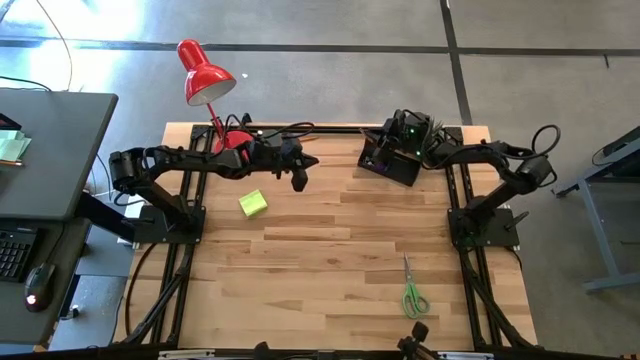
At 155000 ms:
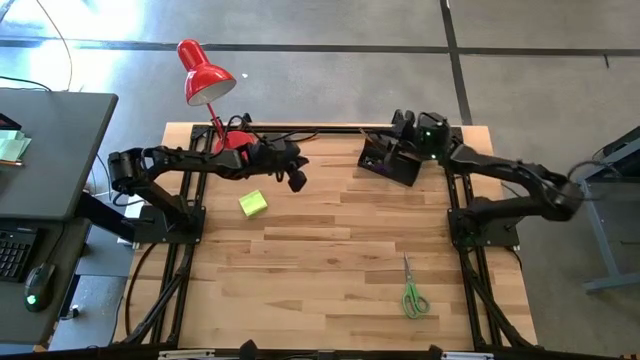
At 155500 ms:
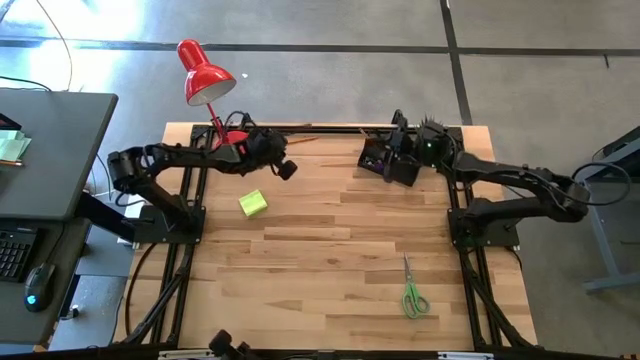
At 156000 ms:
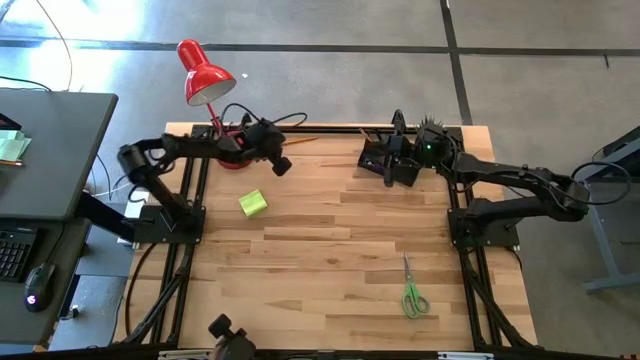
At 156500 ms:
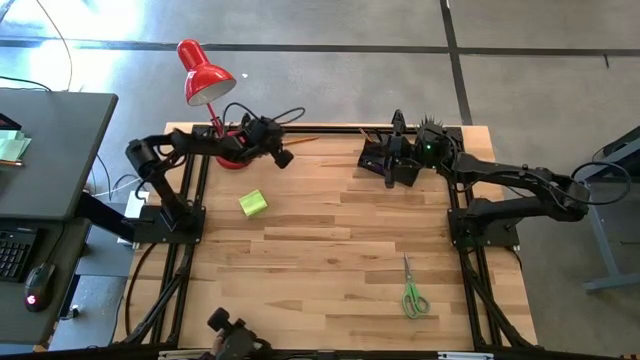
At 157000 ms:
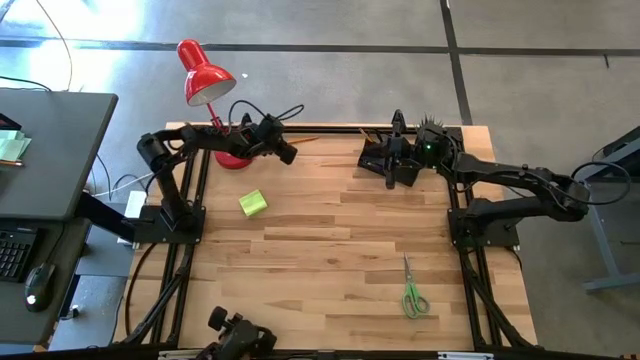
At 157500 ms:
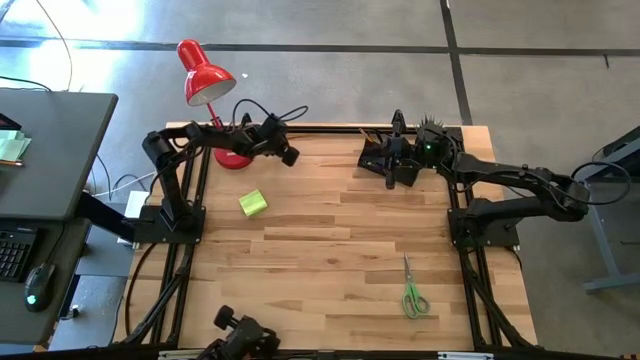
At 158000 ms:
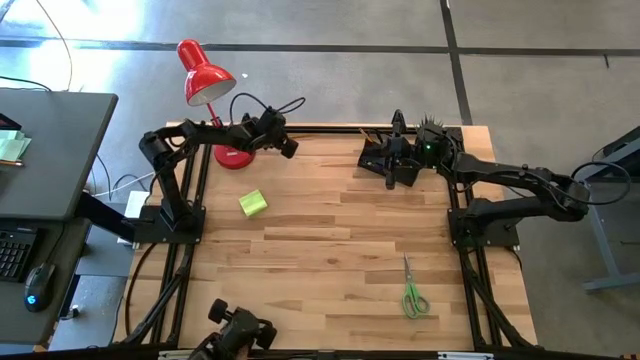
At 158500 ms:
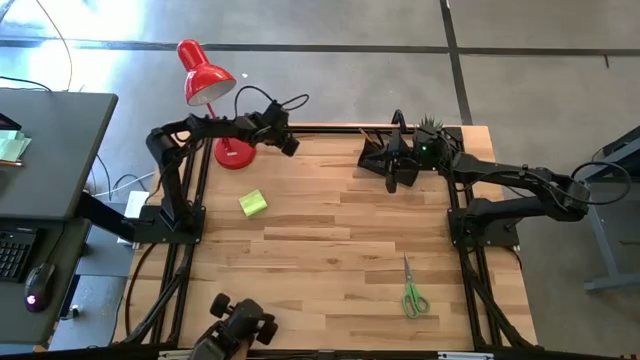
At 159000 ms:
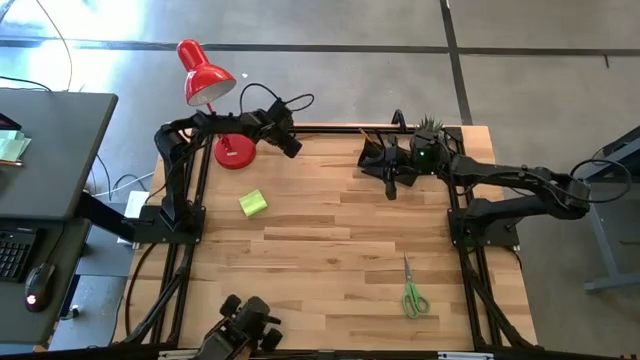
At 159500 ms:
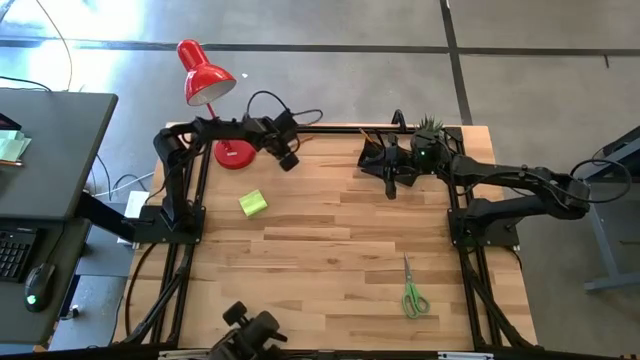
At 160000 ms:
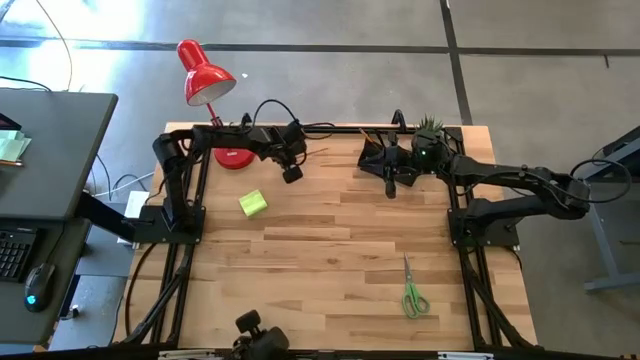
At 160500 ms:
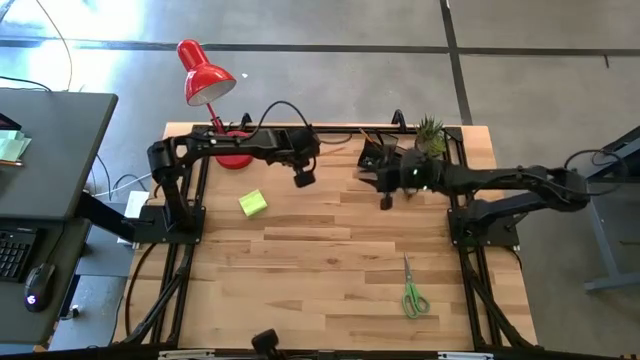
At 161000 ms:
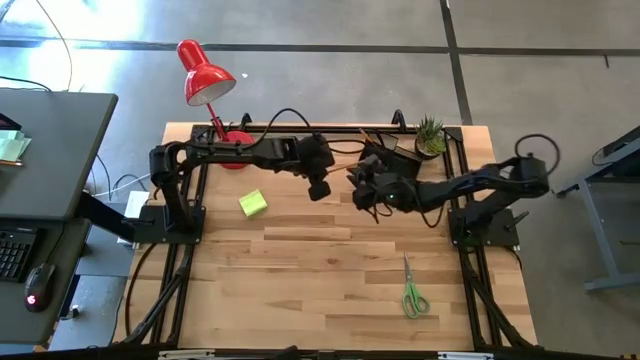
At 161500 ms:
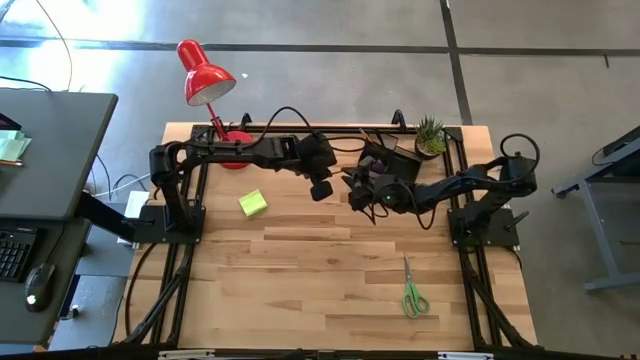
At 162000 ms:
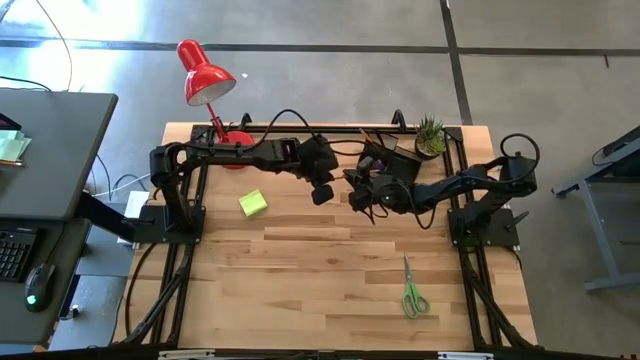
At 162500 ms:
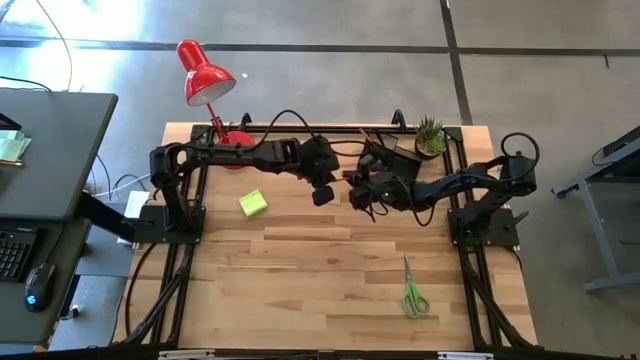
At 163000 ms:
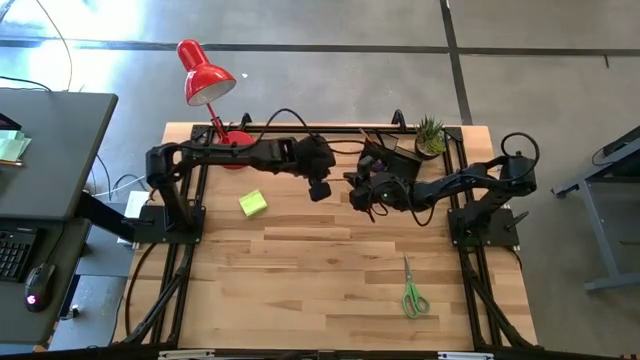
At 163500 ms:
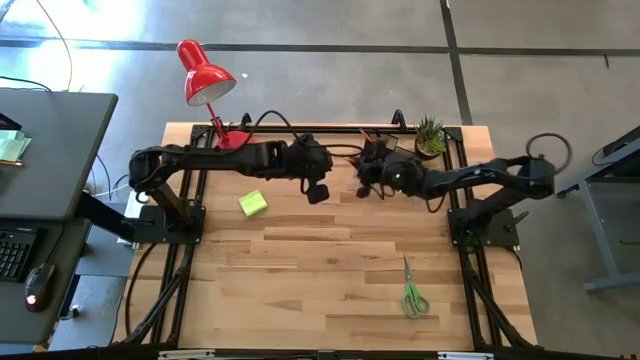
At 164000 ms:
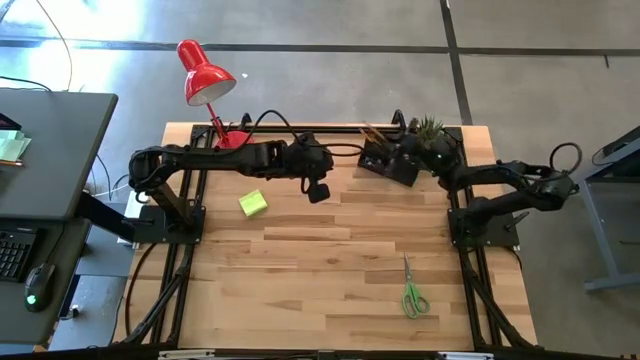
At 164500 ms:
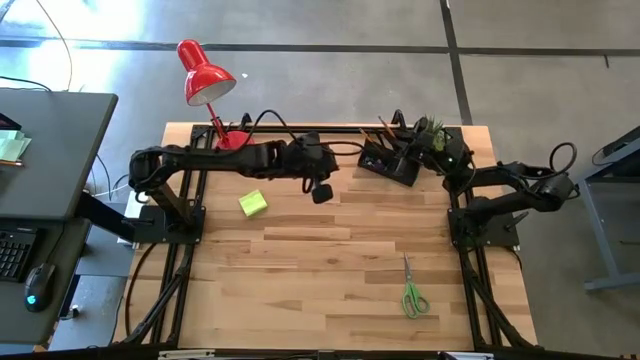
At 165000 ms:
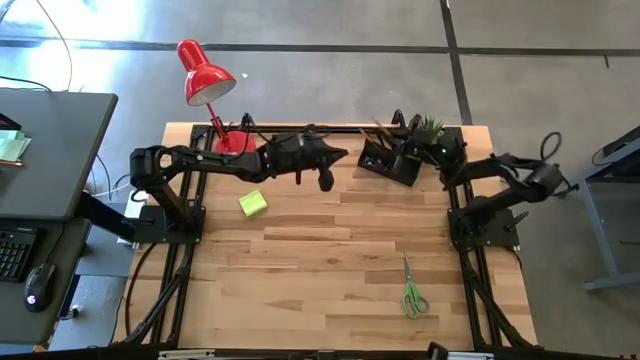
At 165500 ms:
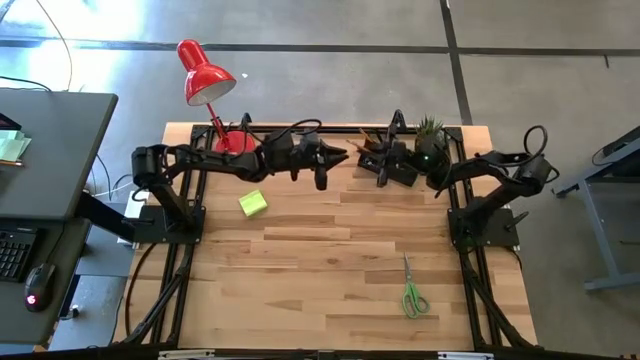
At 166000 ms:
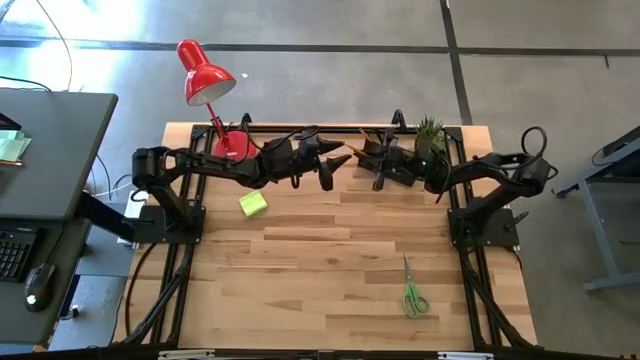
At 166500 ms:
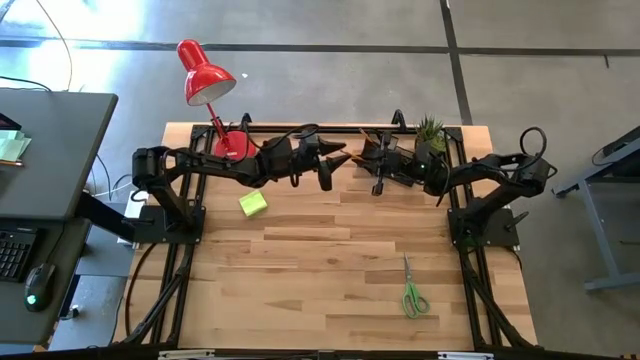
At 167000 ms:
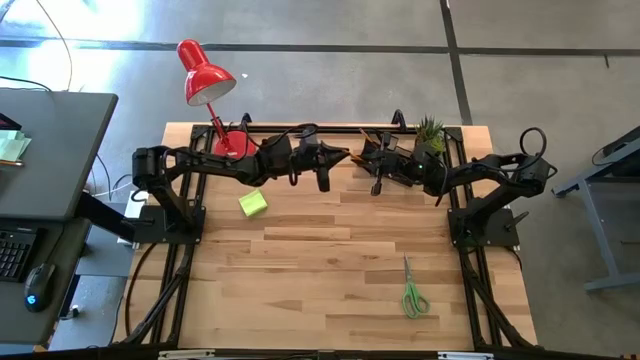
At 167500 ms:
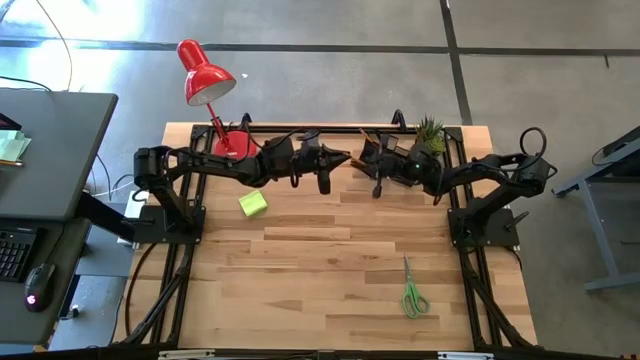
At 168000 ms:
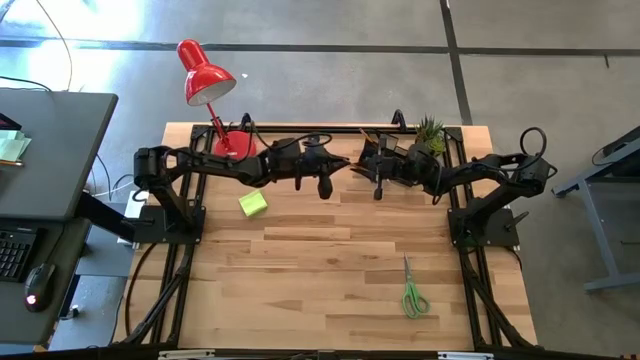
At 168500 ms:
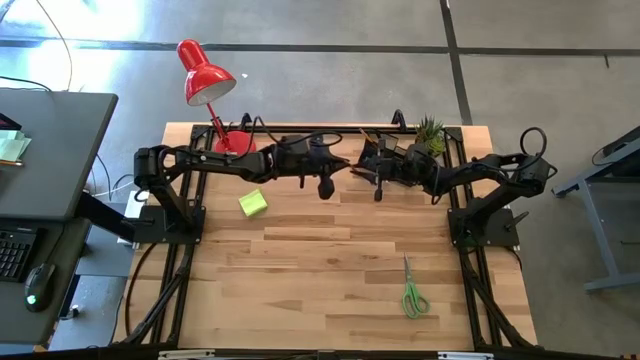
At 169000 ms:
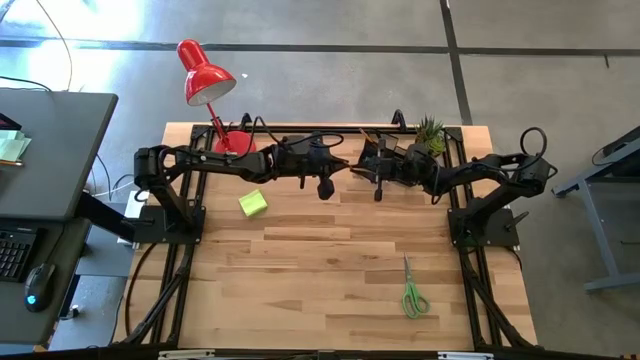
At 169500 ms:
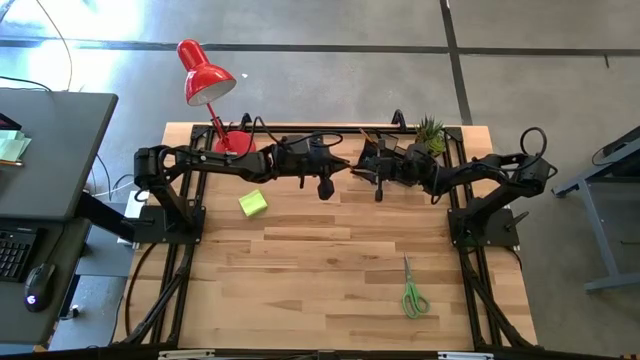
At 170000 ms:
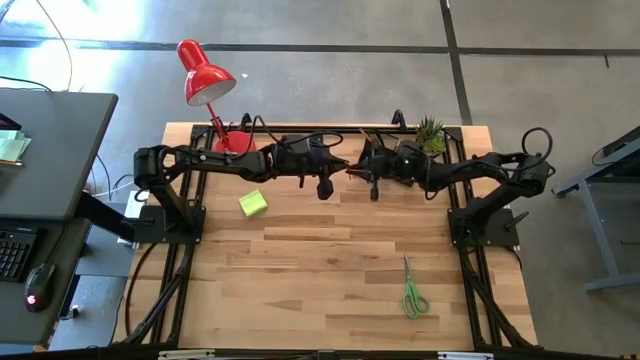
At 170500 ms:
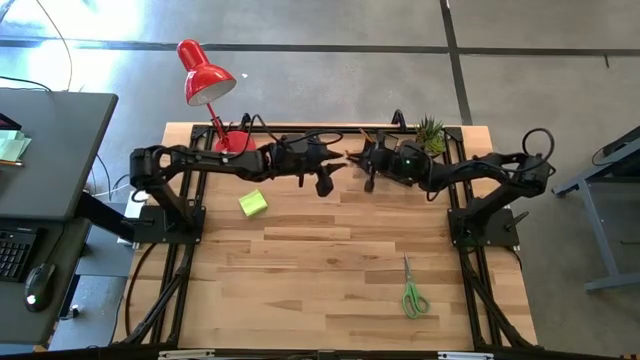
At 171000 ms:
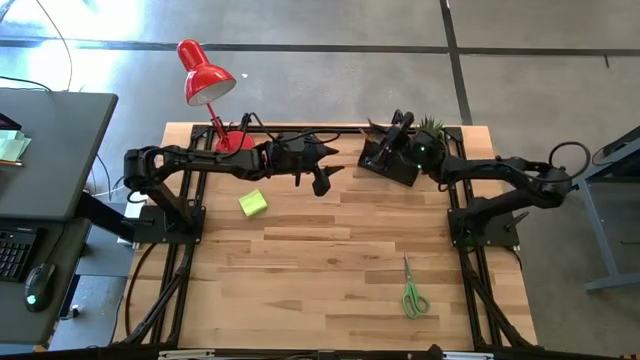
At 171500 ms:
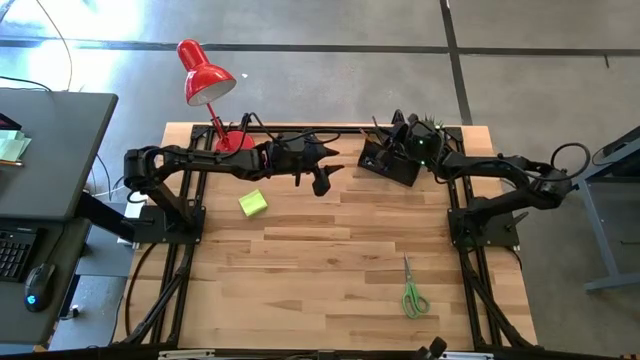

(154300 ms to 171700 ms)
Task: Pick and place office supplies into organizer
Put the yellow pencil into the black desk organizer

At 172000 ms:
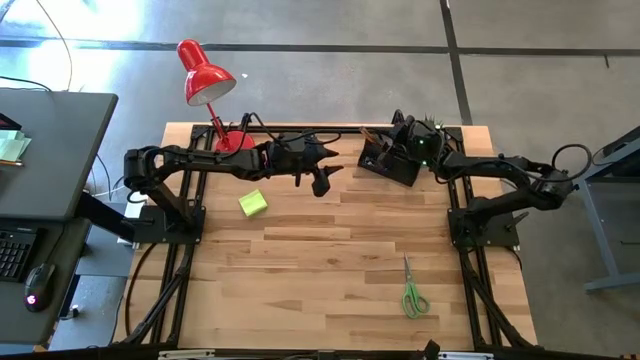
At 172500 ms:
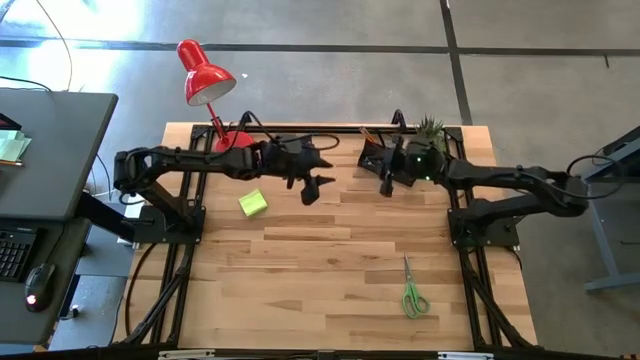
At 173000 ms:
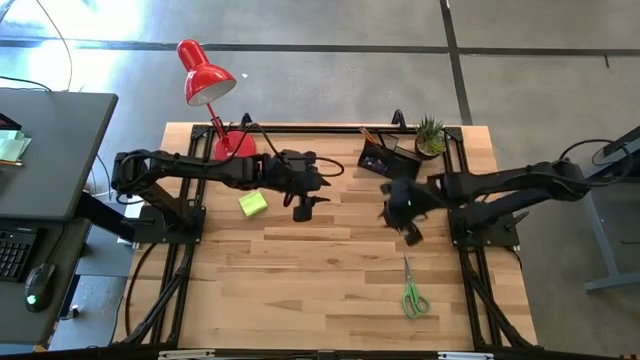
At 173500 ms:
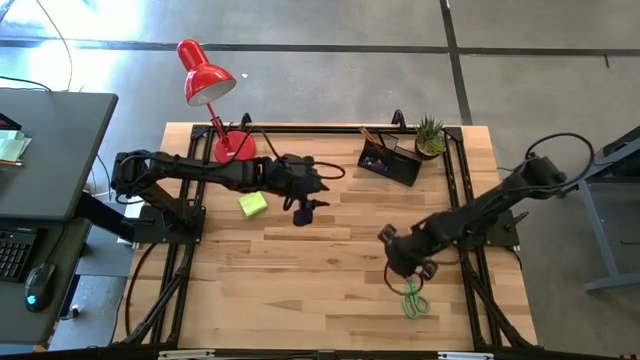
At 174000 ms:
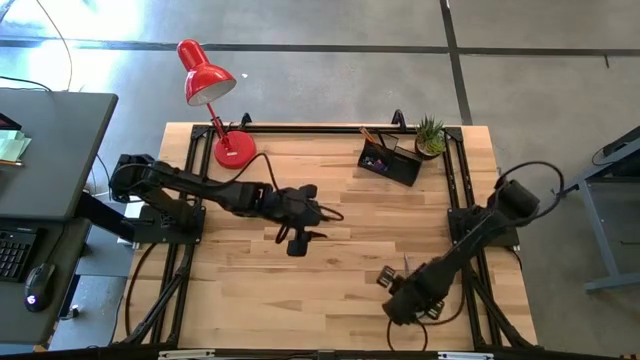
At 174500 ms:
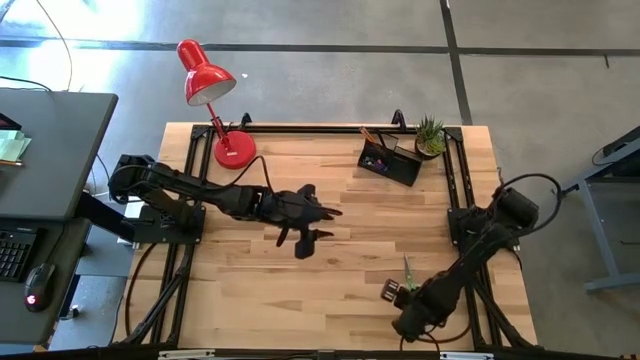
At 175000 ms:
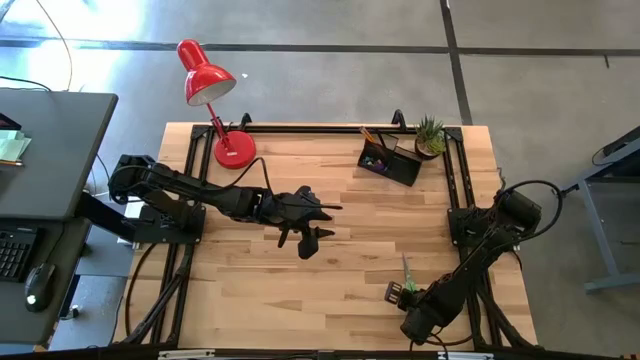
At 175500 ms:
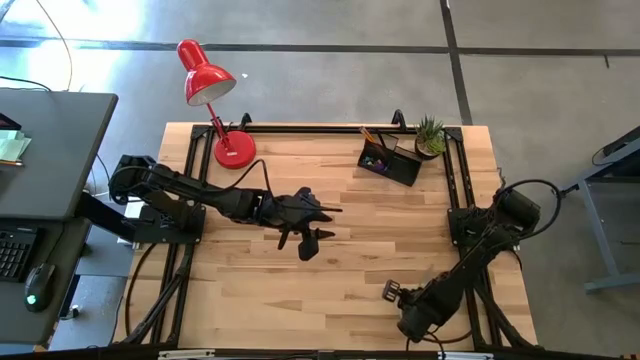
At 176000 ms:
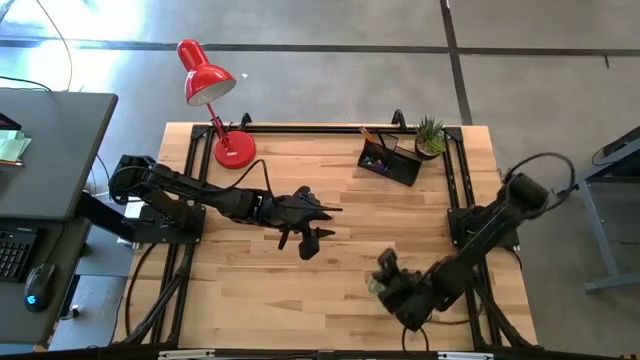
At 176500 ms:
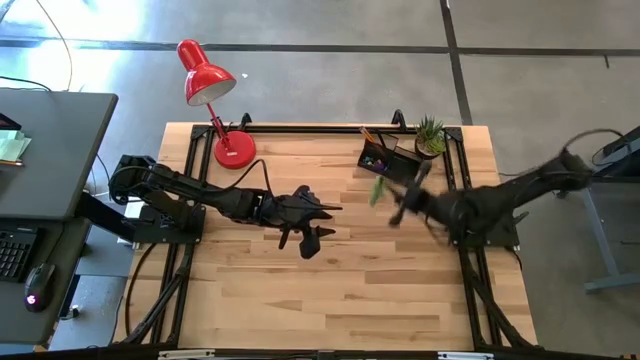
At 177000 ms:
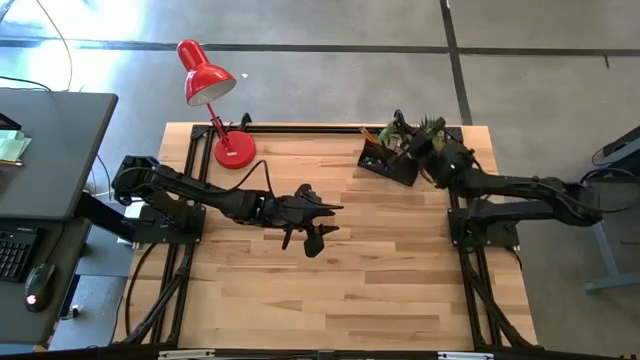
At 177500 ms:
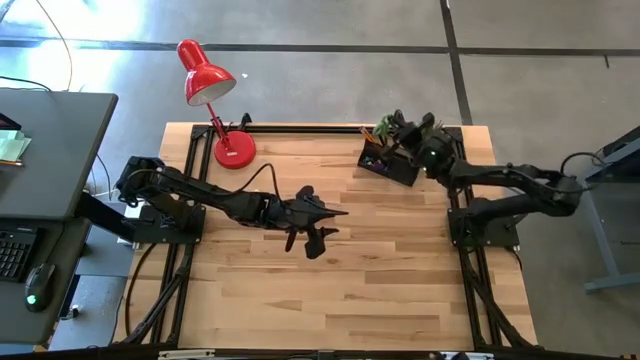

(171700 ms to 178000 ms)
Put the green scissors into the black desk organizer
